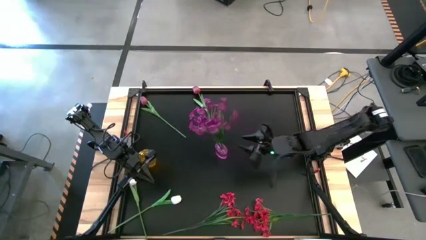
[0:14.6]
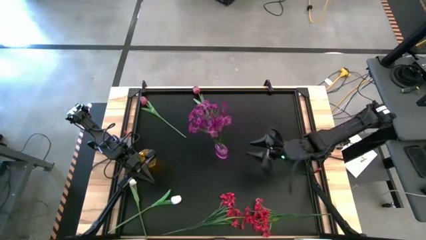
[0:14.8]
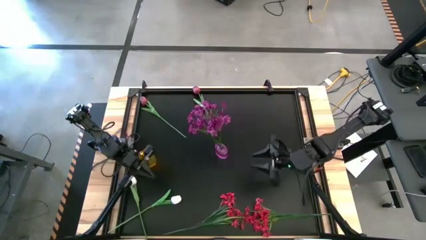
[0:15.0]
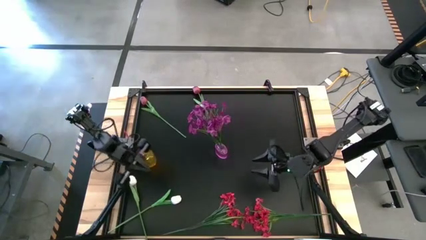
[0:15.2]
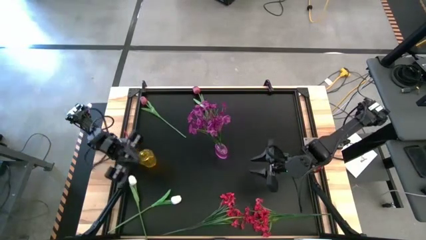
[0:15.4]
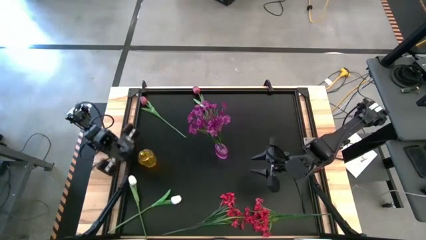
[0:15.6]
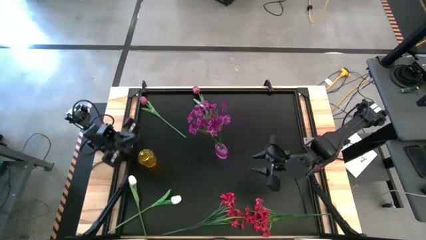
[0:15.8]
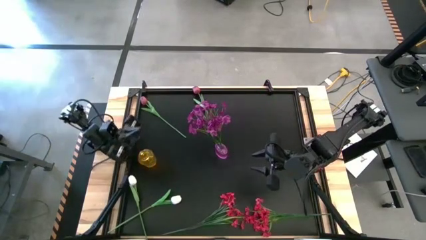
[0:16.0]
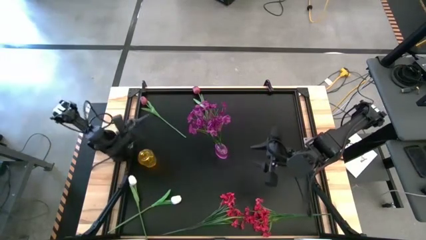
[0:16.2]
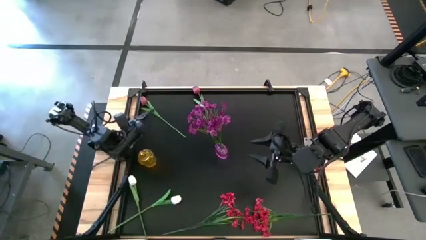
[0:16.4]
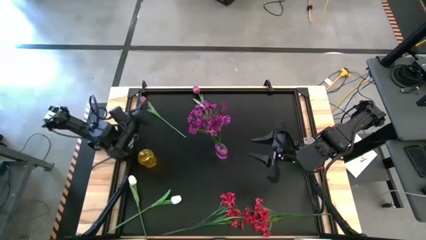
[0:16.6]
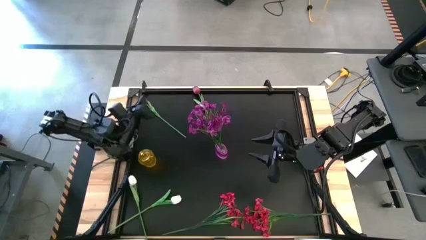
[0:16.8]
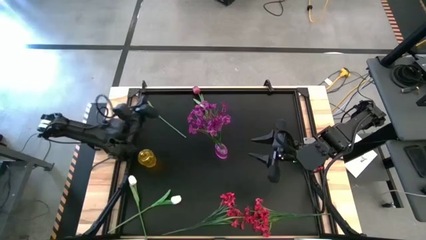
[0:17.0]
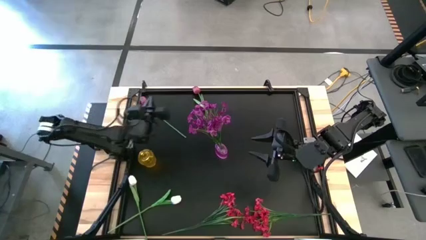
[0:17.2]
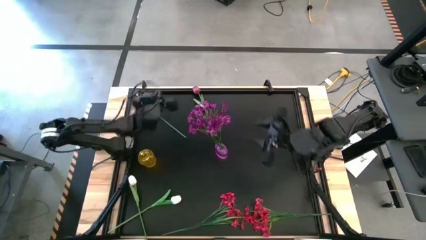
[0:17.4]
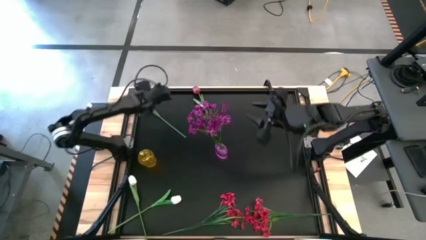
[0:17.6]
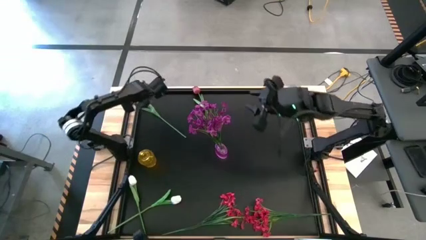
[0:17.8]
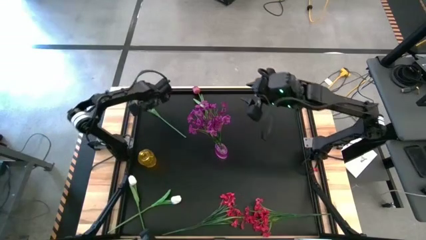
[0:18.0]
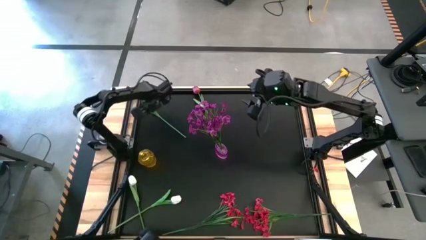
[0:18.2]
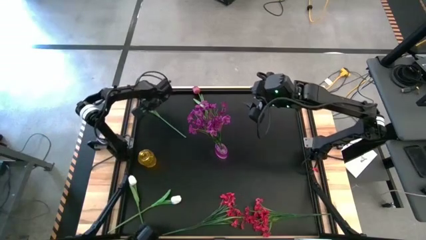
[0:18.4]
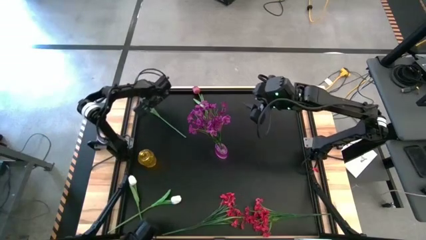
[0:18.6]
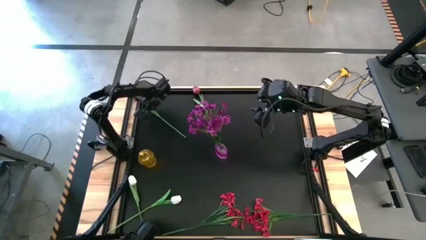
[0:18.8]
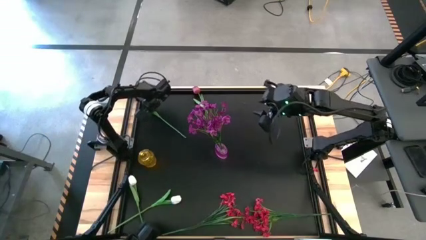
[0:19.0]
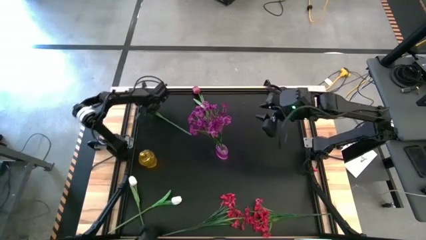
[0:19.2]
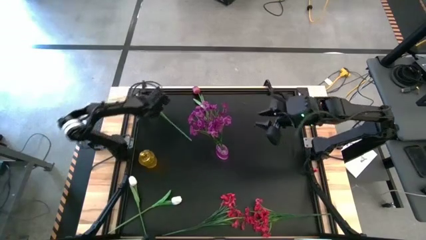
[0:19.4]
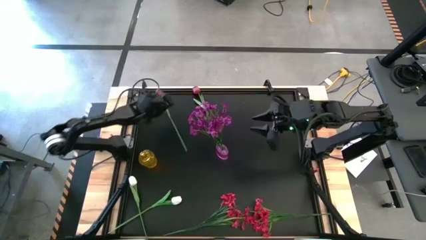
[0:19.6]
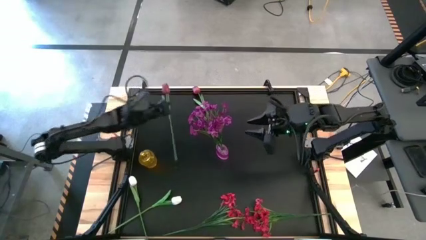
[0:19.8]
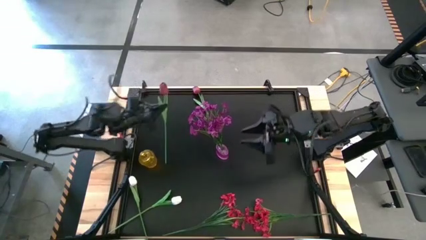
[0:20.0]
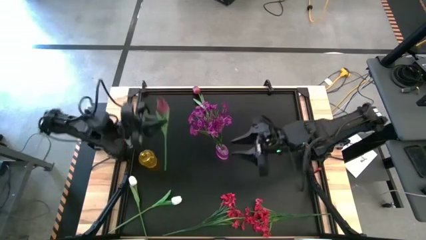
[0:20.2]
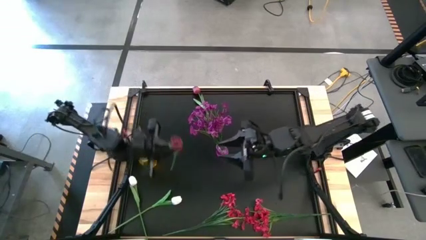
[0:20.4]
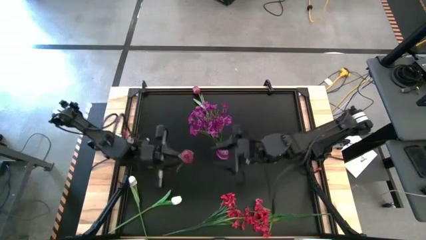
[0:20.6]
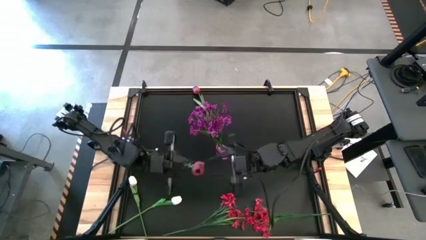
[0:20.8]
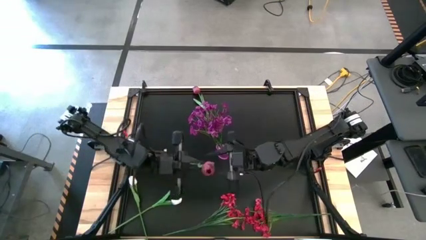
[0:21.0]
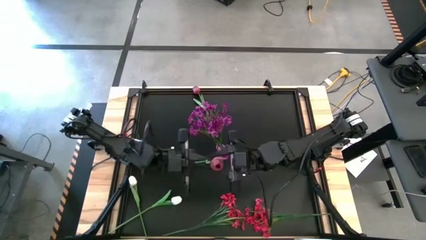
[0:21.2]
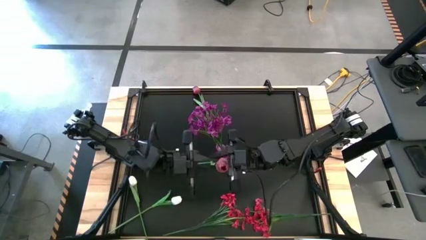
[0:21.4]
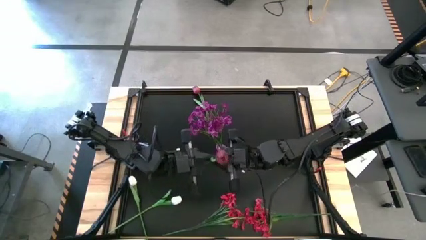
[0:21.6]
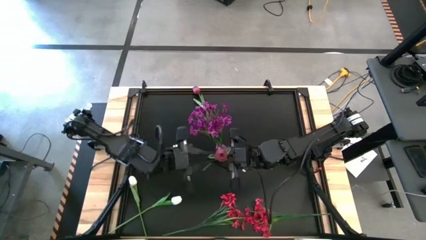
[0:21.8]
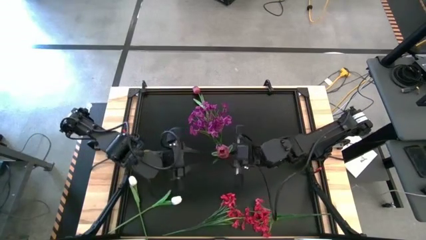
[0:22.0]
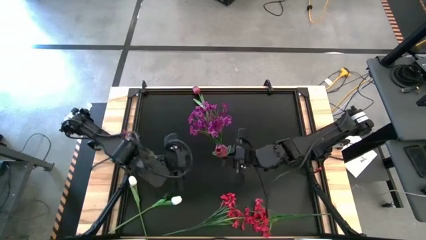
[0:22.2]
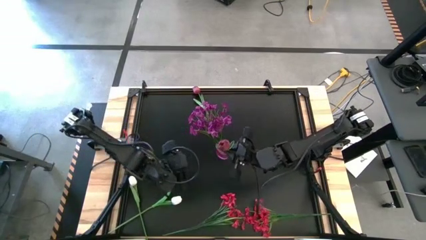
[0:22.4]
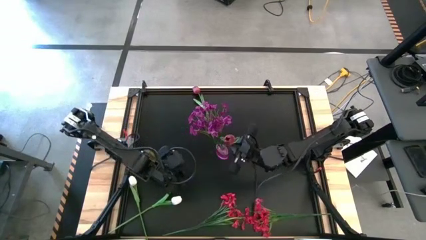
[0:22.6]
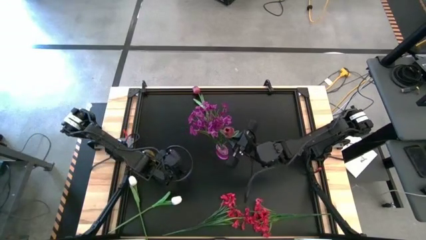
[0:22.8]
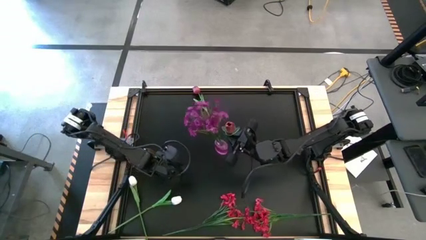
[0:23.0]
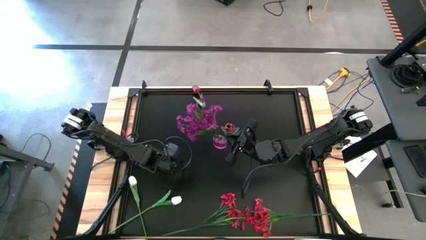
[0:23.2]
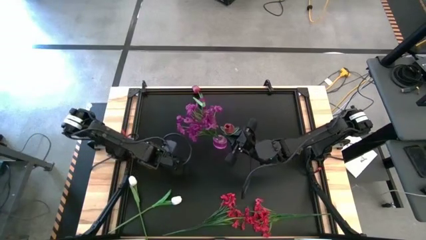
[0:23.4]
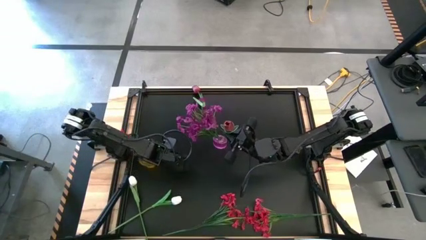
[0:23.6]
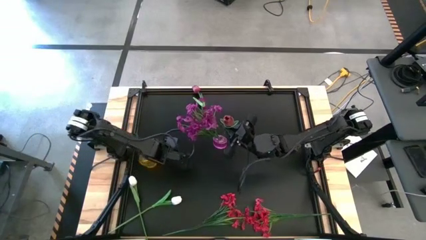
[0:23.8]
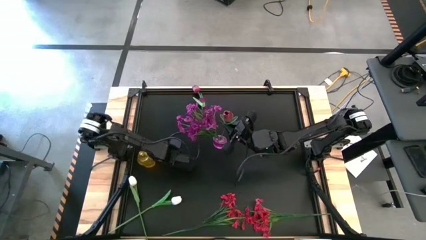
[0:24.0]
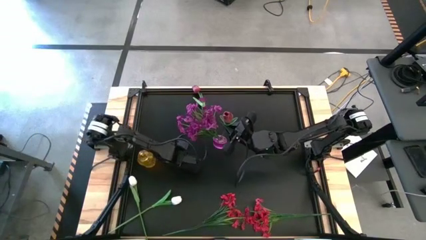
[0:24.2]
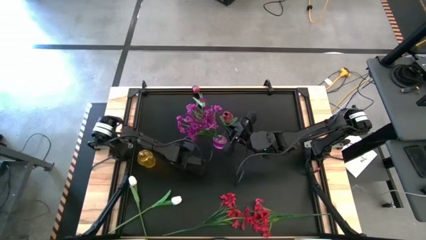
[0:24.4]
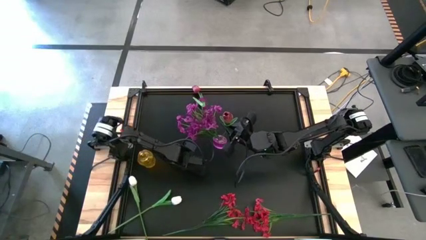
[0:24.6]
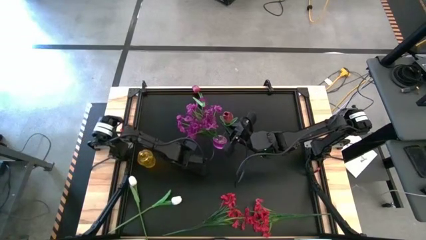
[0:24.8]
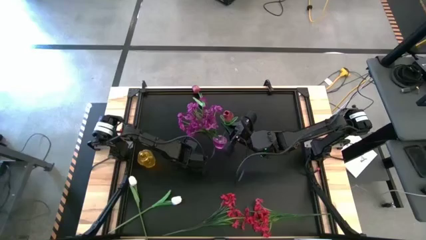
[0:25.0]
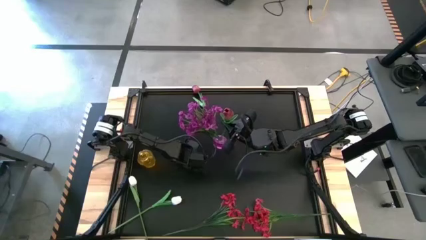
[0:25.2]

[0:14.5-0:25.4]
Task: Sort flowers into vase by color
Put the left red tulip into the violet flower vase

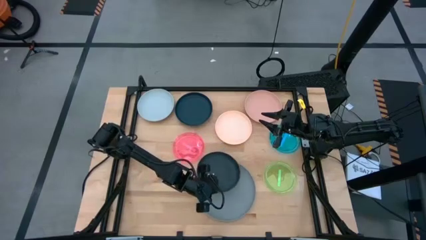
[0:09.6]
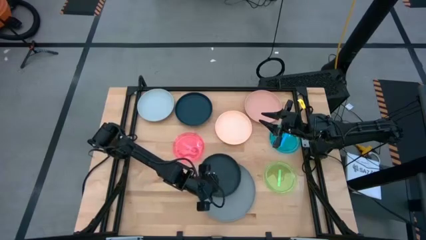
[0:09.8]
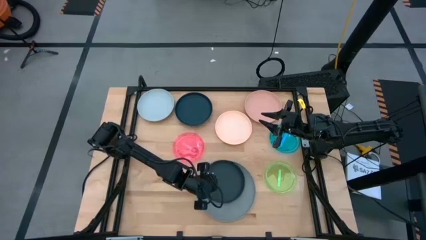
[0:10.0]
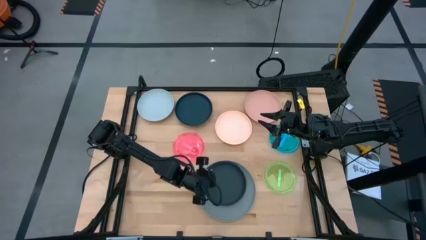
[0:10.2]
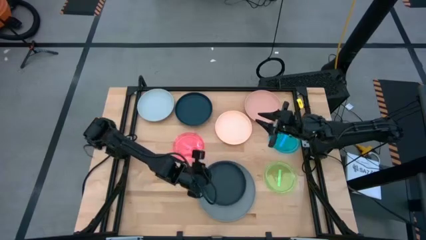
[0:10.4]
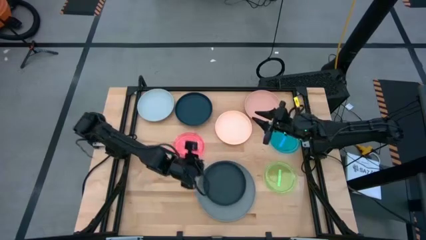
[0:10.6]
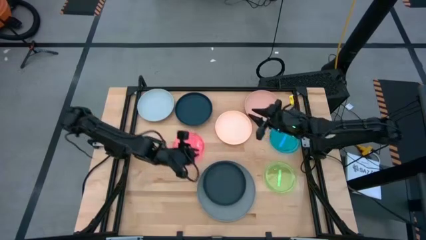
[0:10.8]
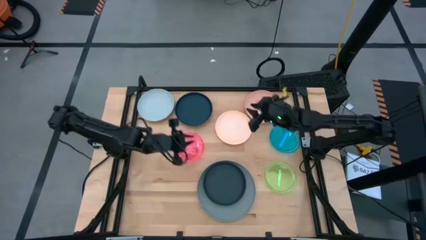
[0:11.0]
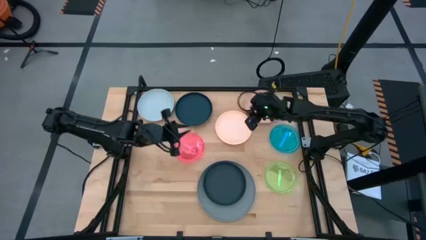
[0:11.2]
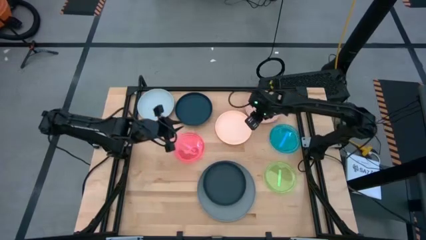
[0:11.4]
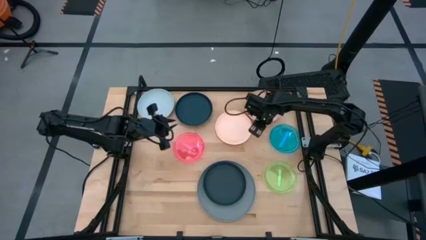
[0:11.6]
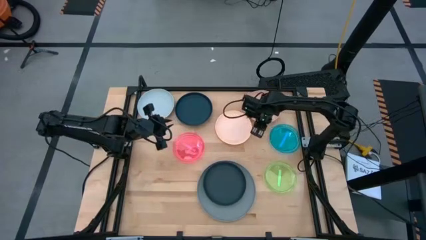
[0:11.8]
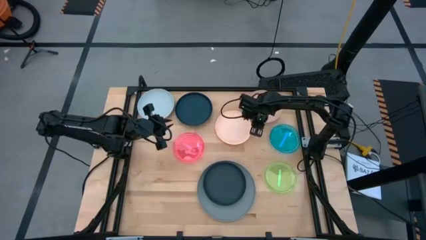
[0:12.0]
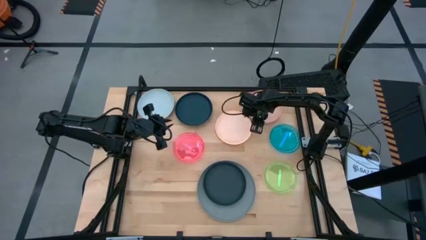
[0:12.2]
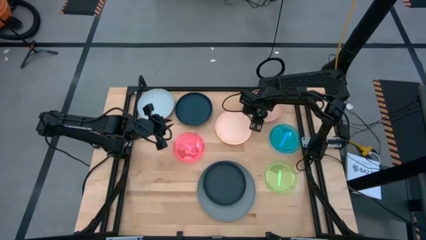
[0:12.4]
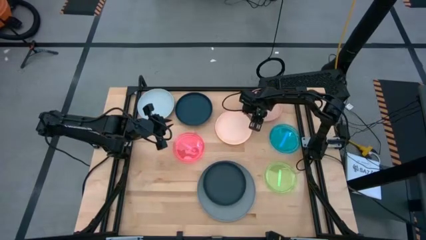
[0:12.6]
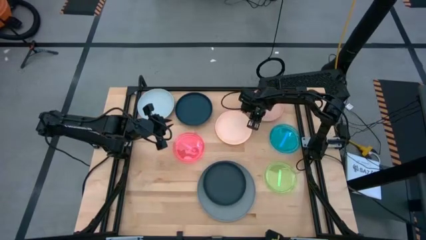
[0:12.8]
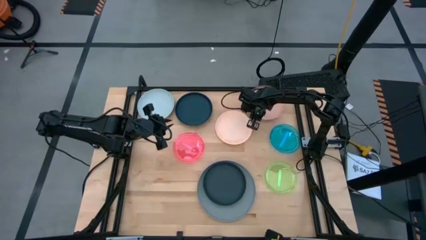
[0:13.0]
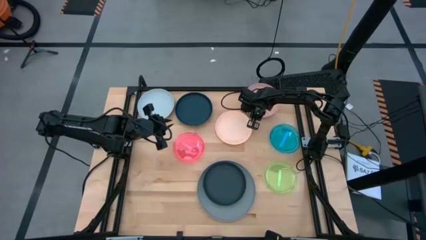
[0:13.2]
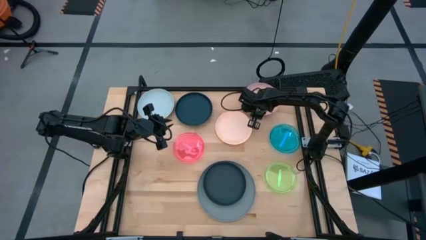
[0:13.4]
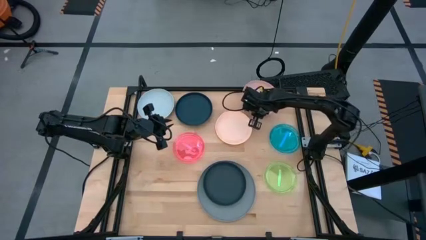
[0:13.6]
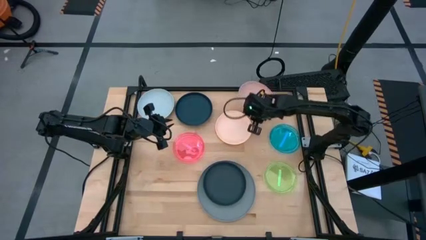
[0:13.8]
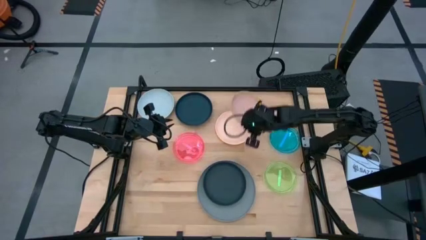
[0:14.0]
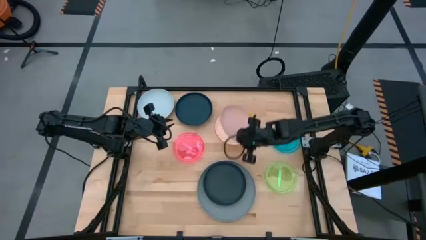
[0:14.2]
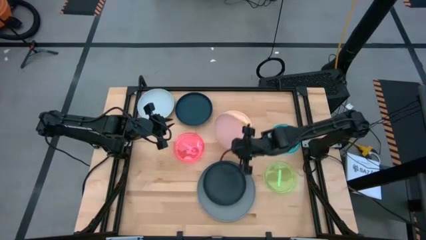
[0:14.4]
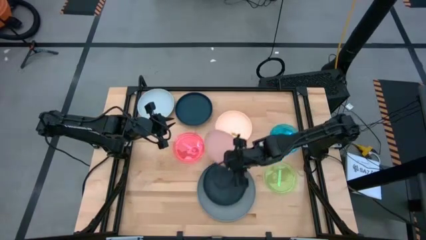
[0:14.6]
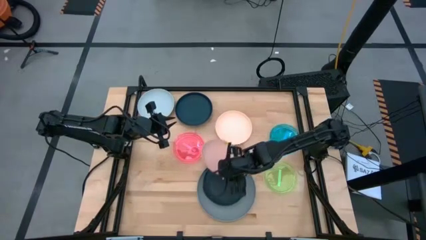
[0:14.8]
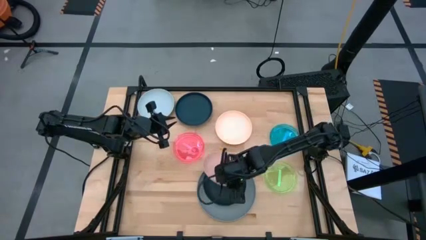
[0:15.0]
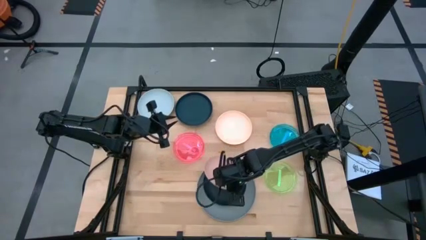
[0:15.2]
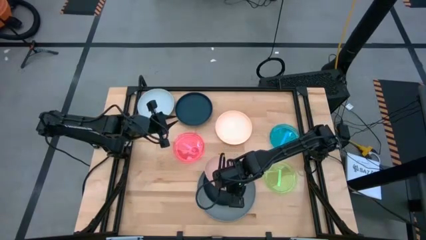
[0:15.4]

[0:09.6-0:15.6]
Task: Stack plastic plates
Stack the light pink plate on top of the bottom black plate
